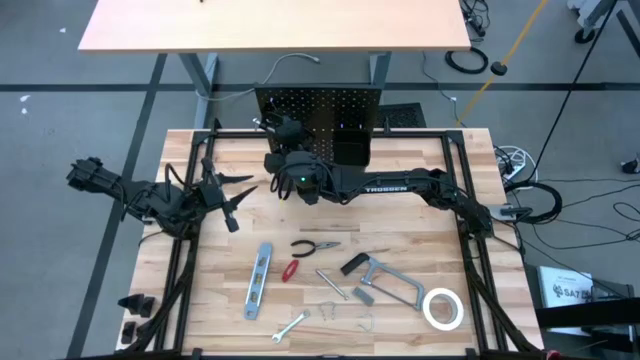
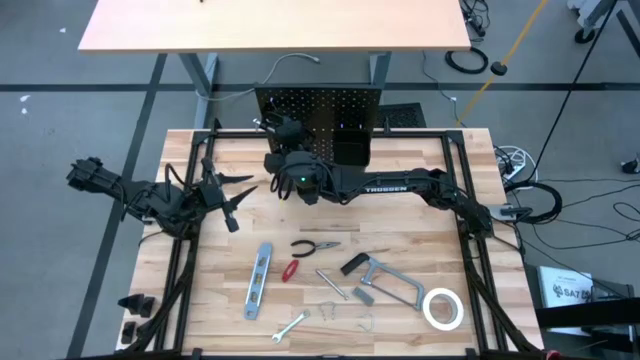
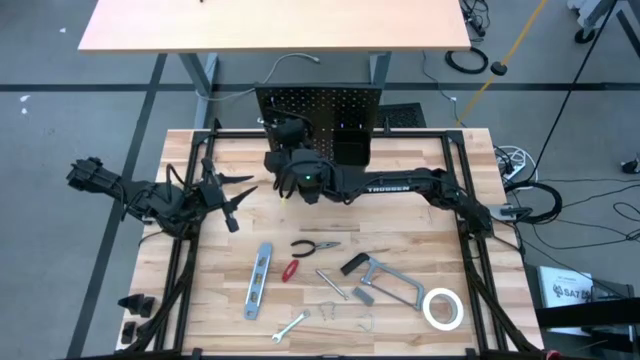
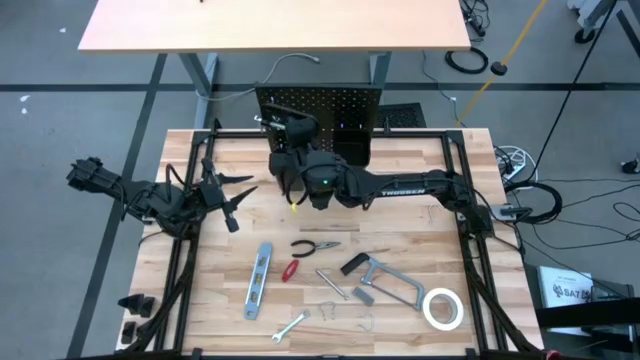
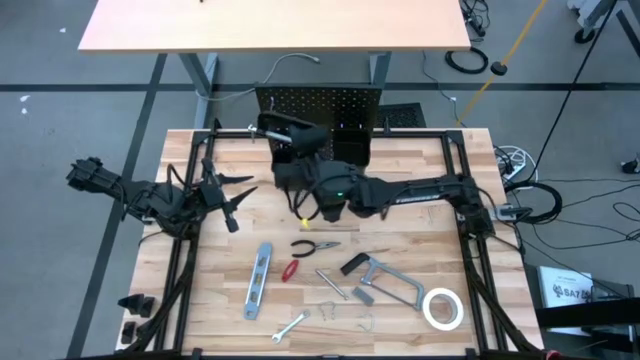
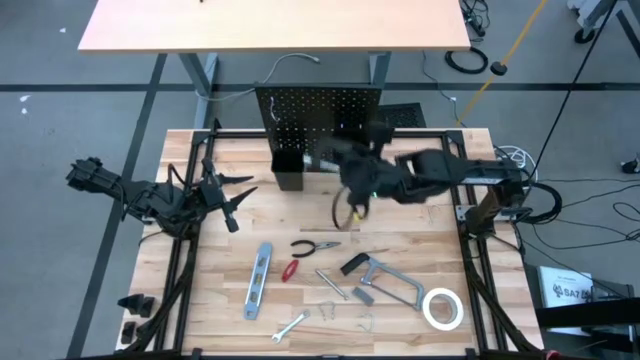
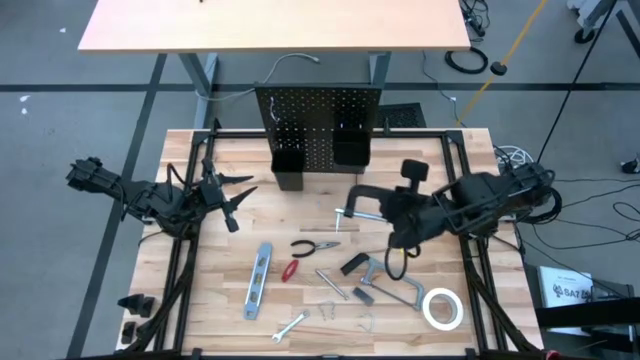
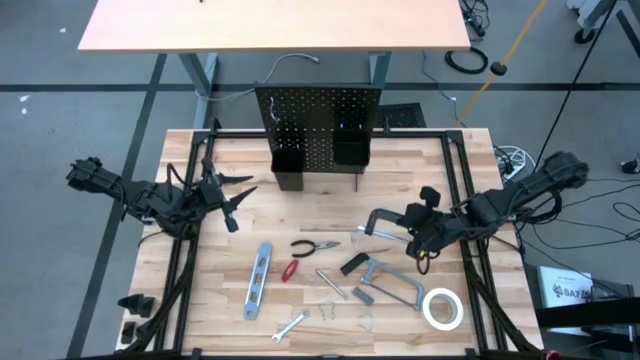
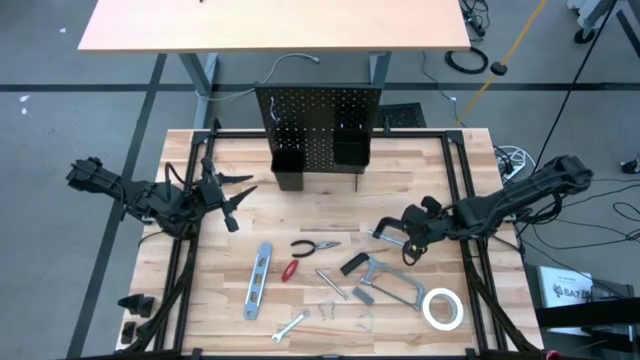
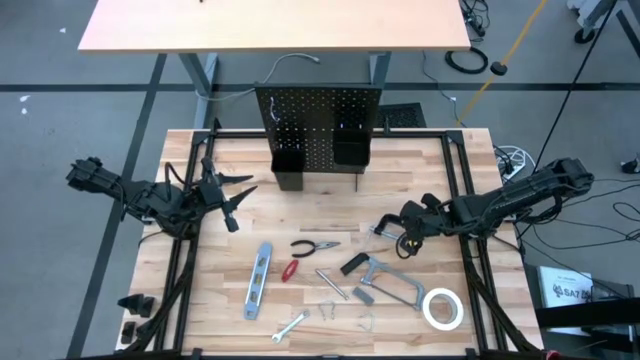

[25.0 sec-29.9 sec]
Task: Hang tools onto peg board
Remove the clamp from the pegboard

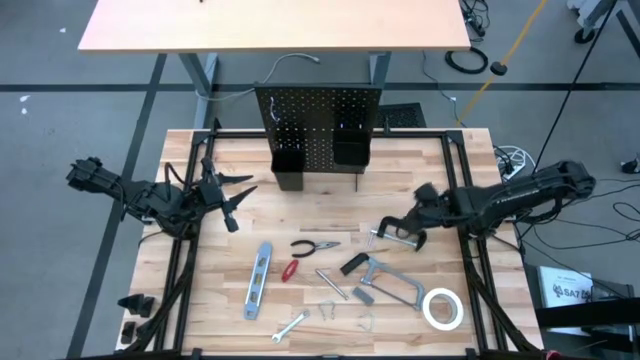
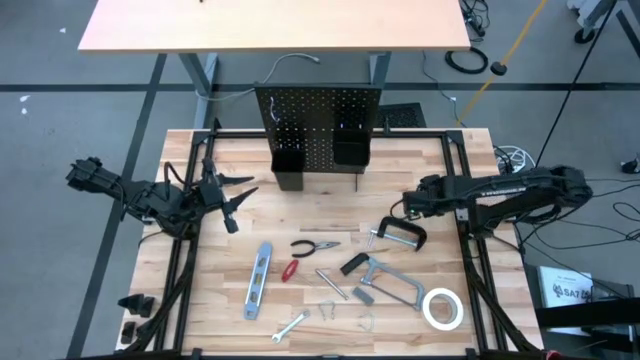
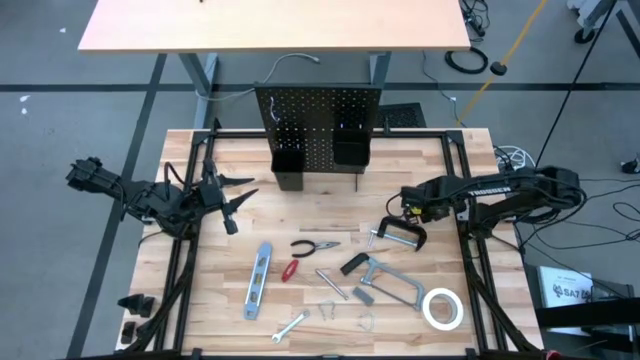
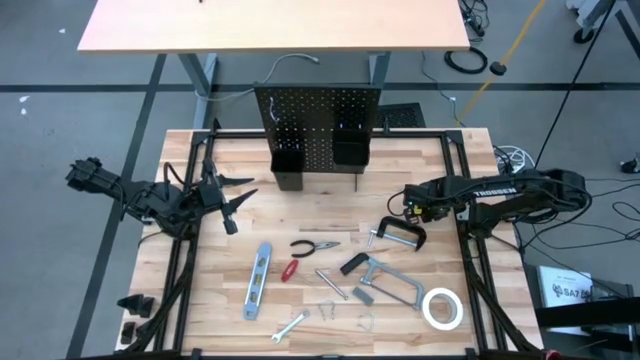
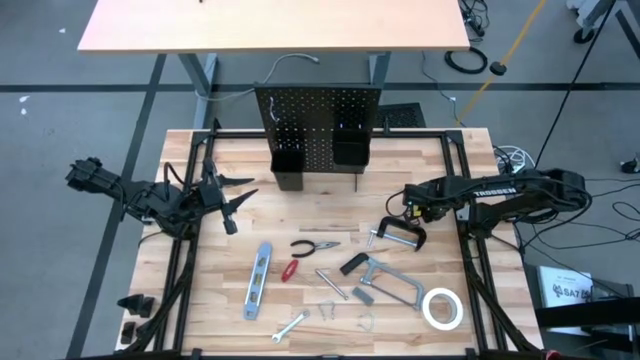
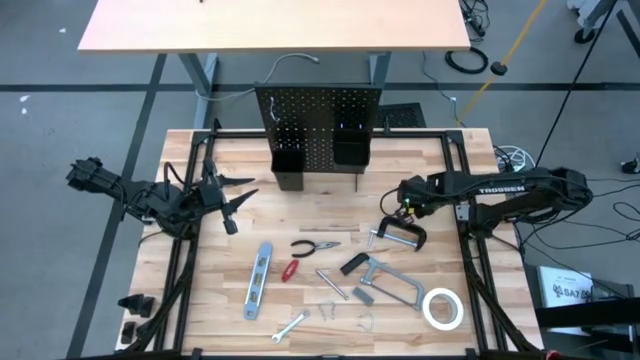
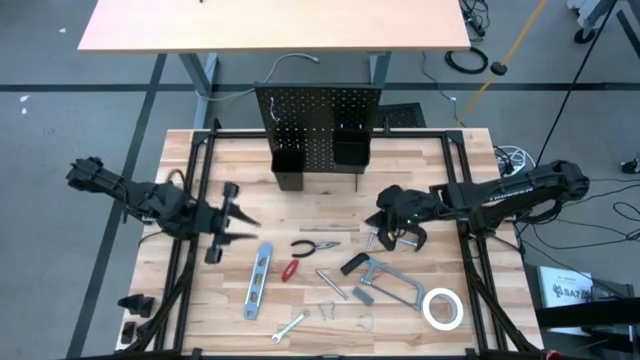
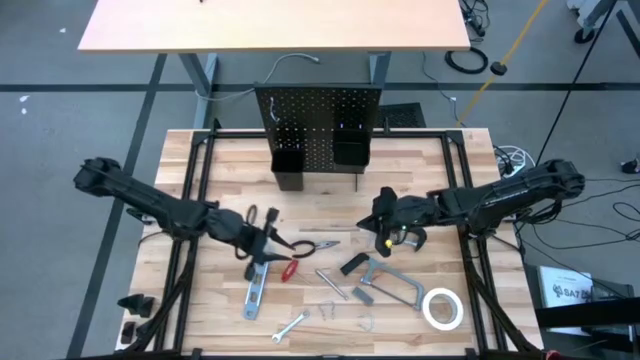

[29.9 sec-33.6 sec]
Insert the right silver hanger hook on the pegboard

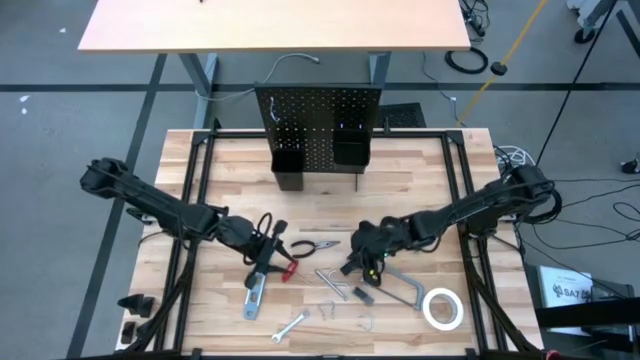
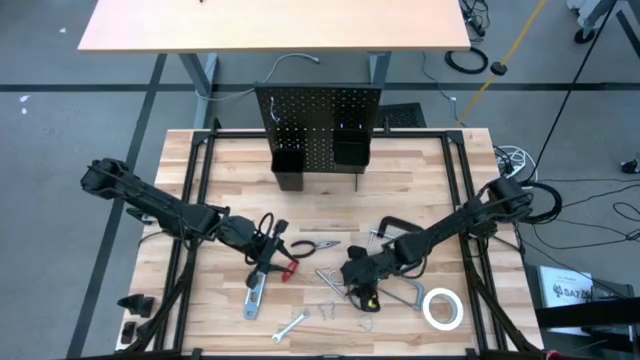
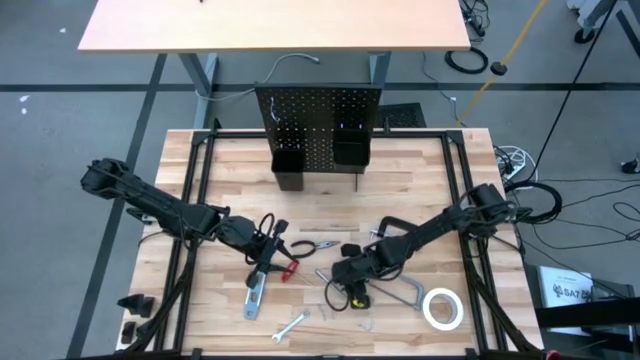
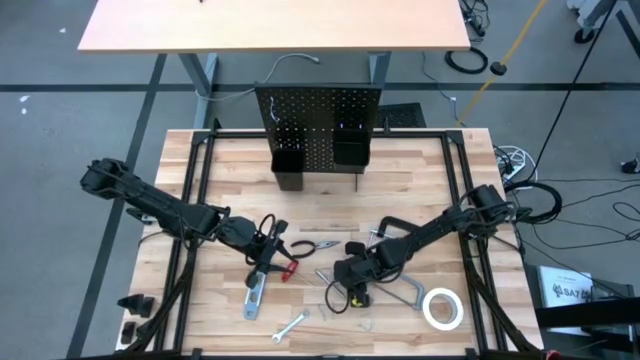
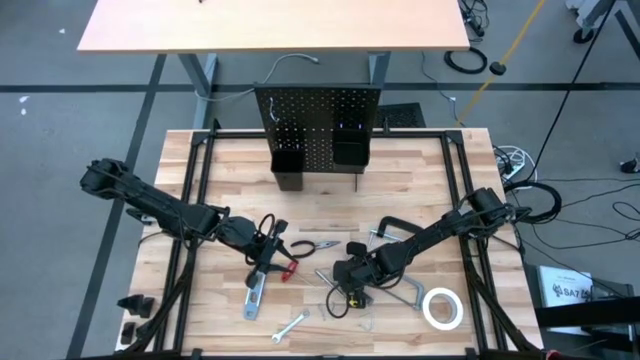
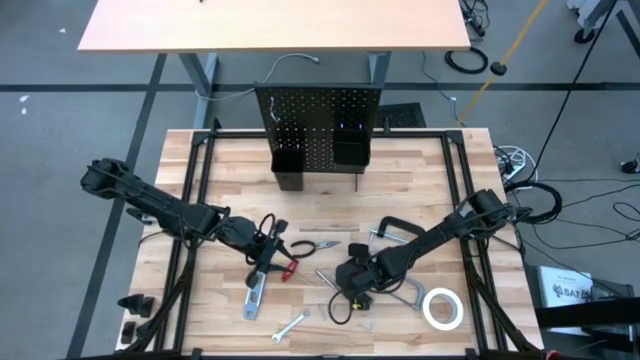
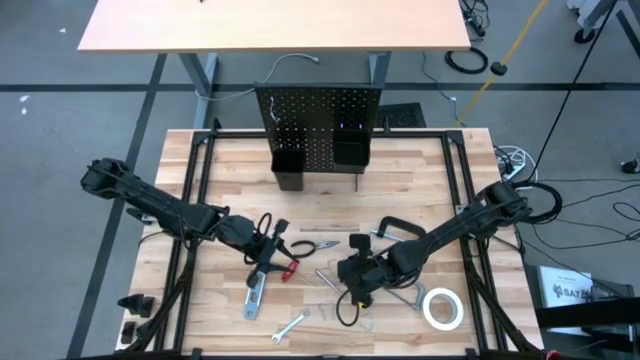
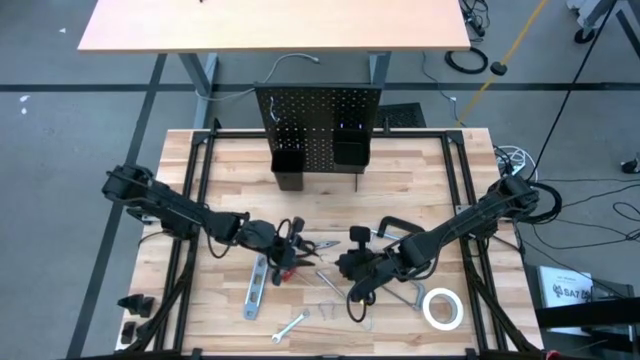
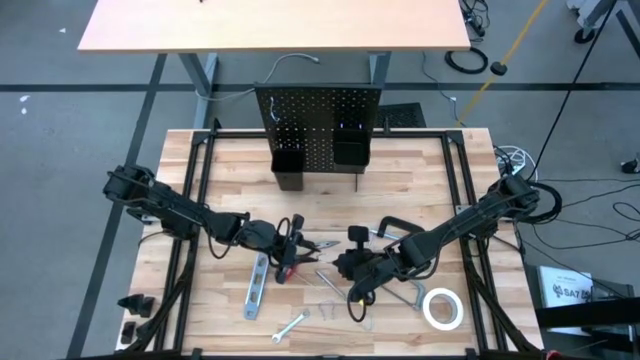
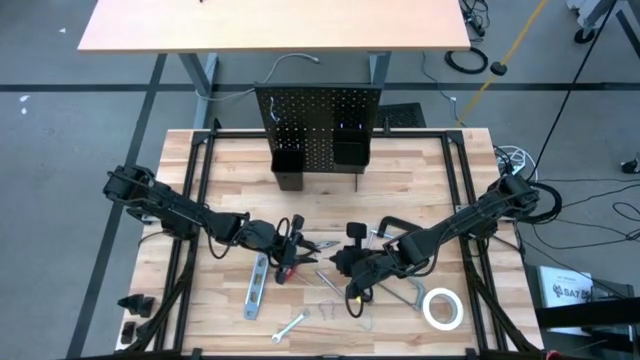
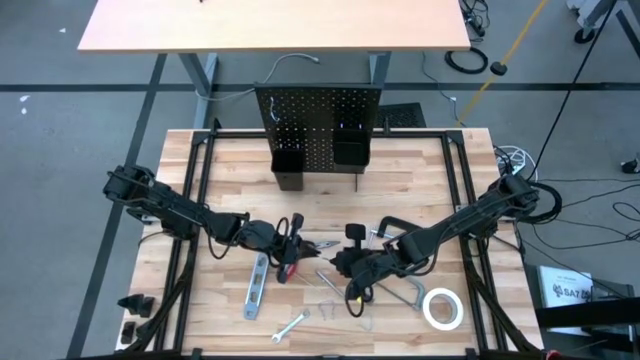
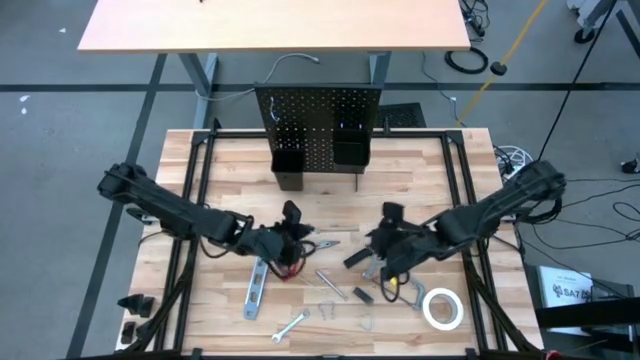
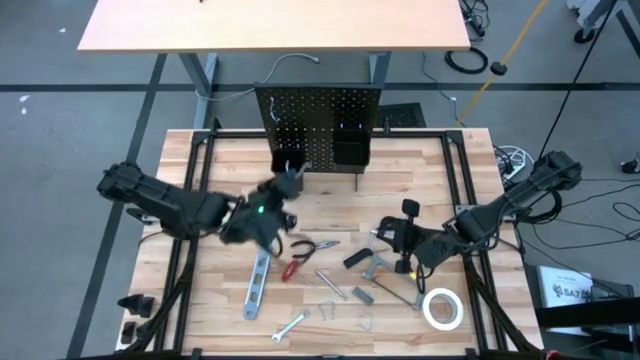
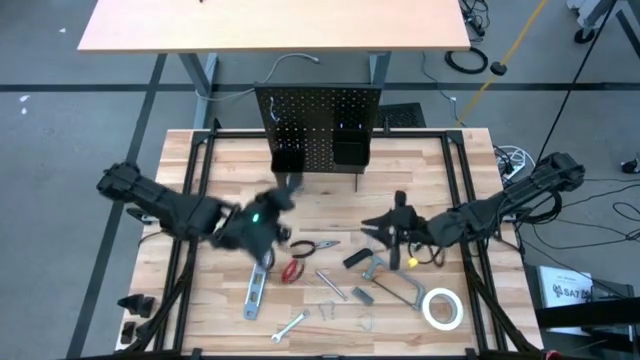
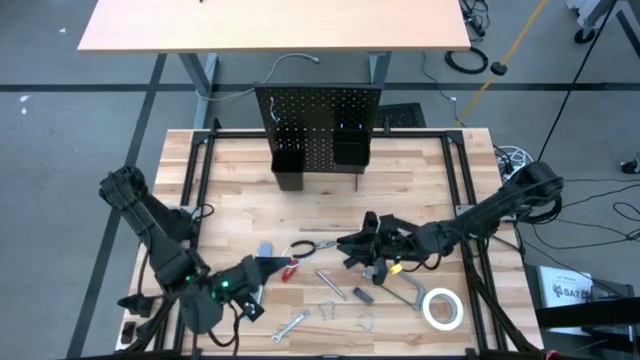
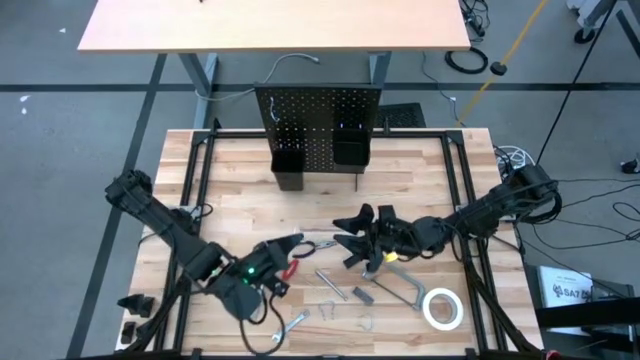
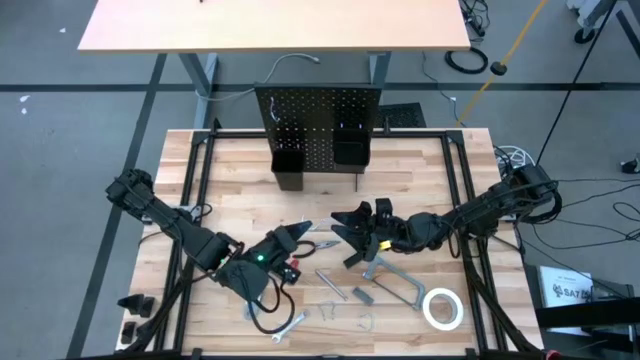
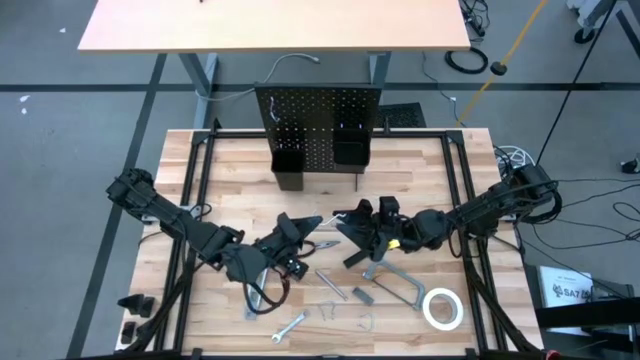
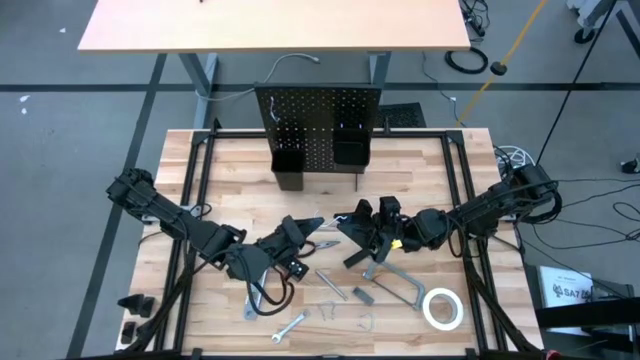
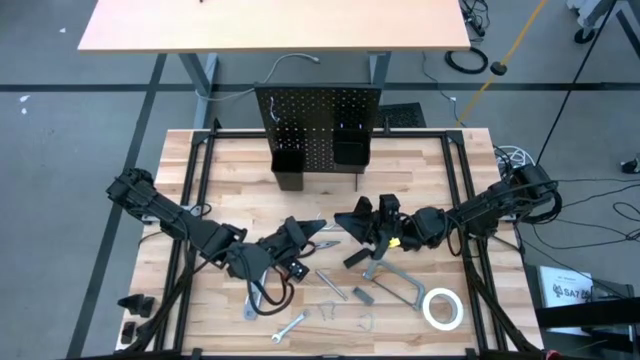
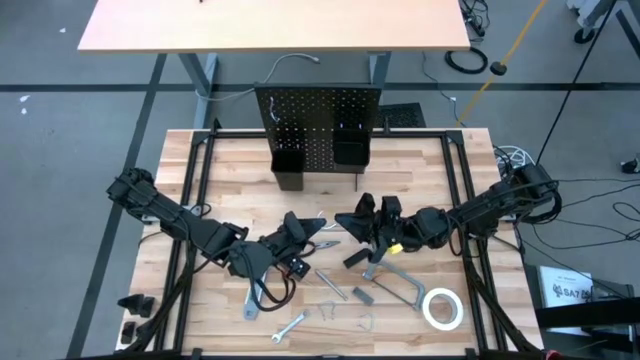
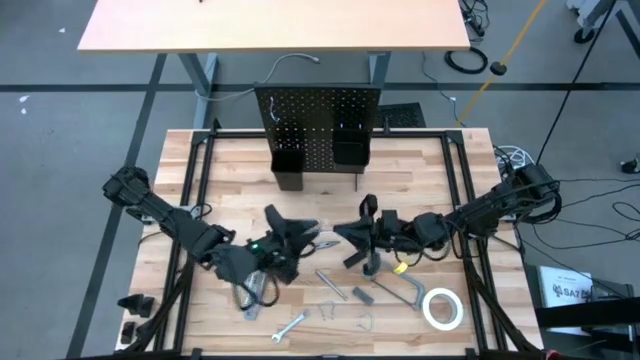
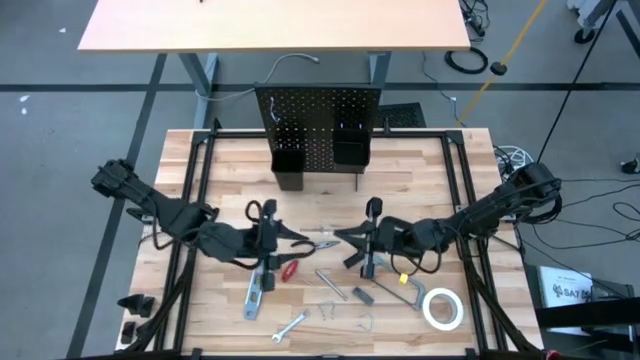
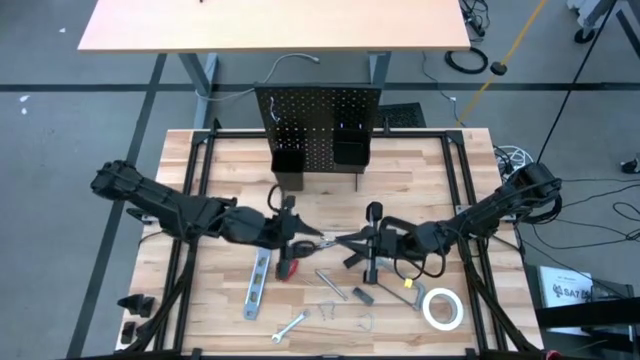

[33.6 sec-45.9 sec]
Insert the right silver hanger hook on the pegboard
